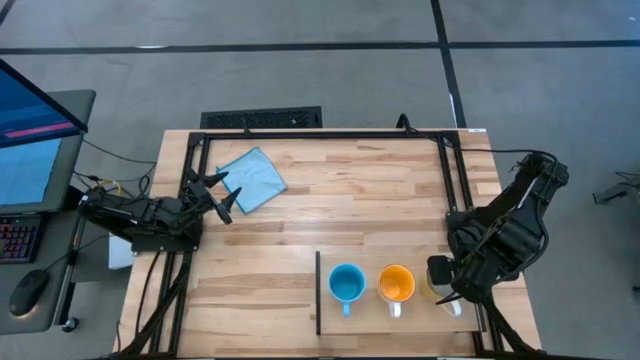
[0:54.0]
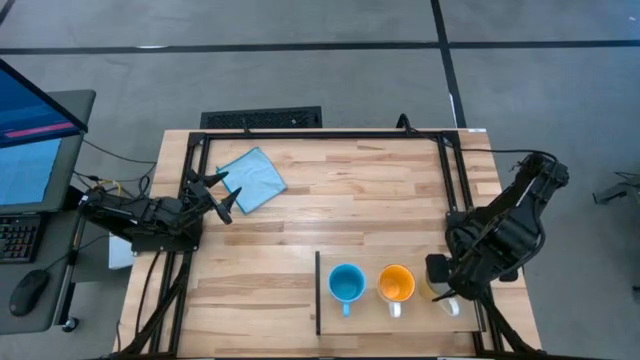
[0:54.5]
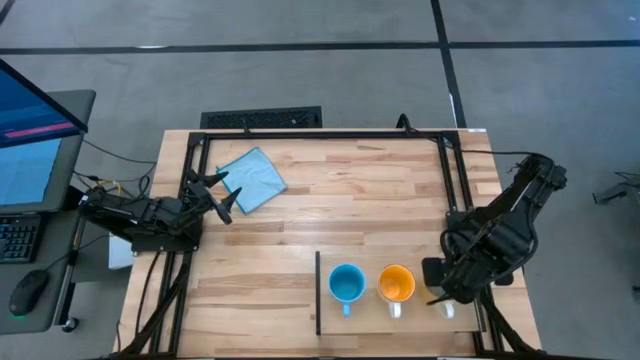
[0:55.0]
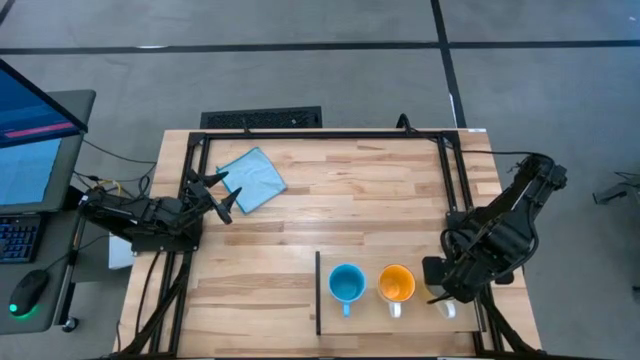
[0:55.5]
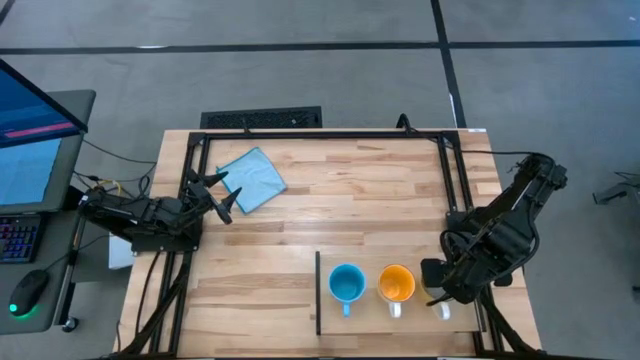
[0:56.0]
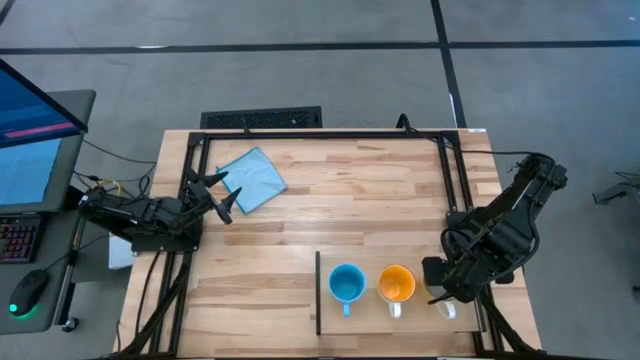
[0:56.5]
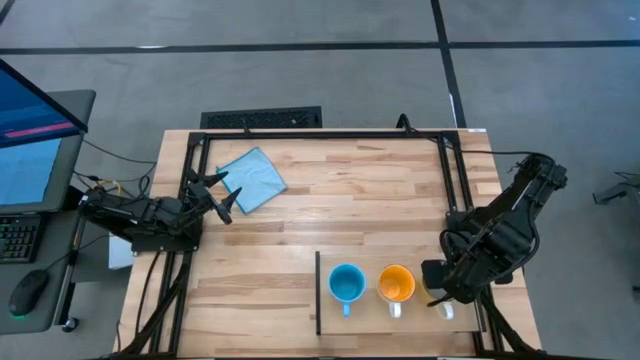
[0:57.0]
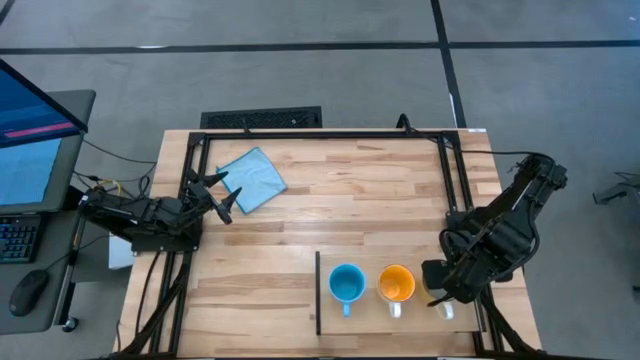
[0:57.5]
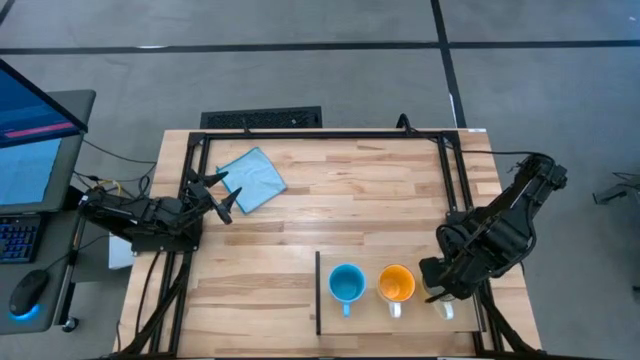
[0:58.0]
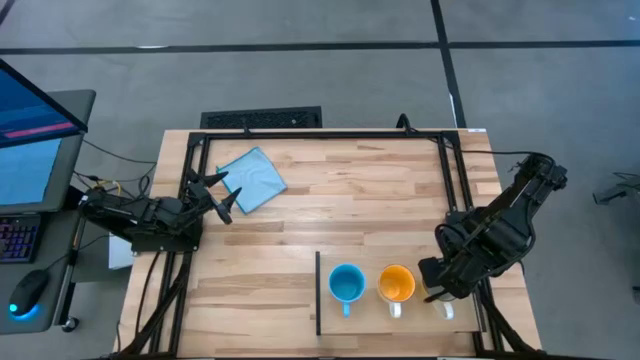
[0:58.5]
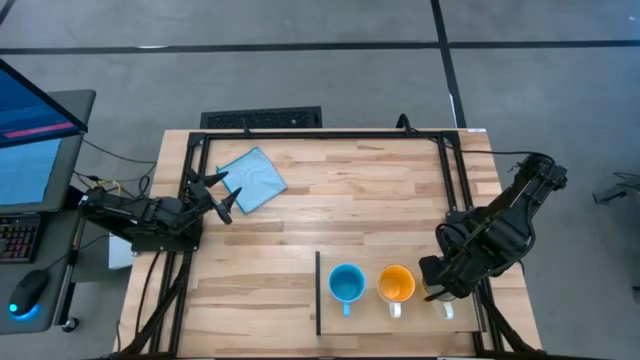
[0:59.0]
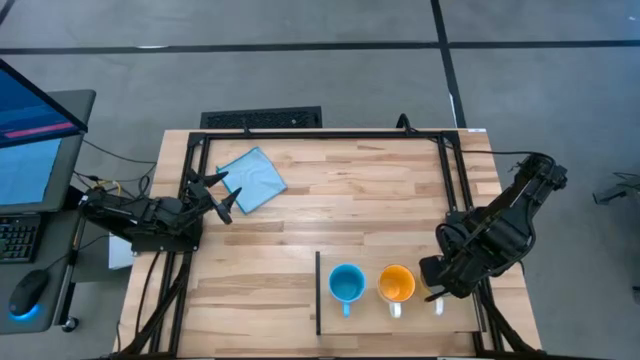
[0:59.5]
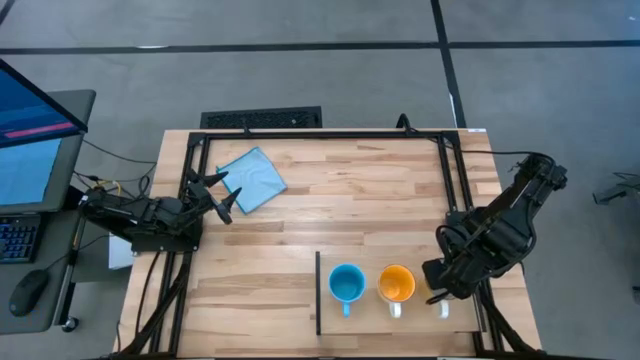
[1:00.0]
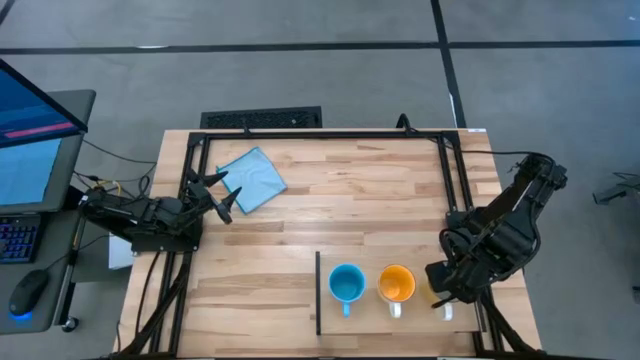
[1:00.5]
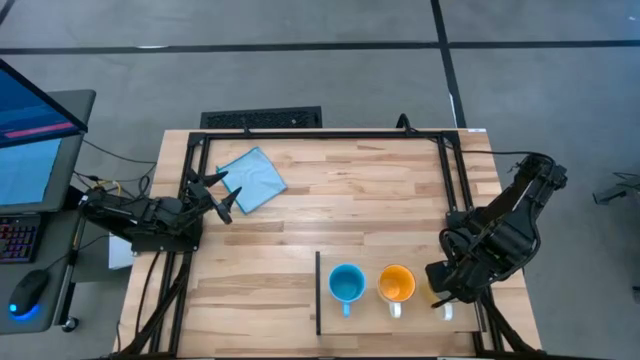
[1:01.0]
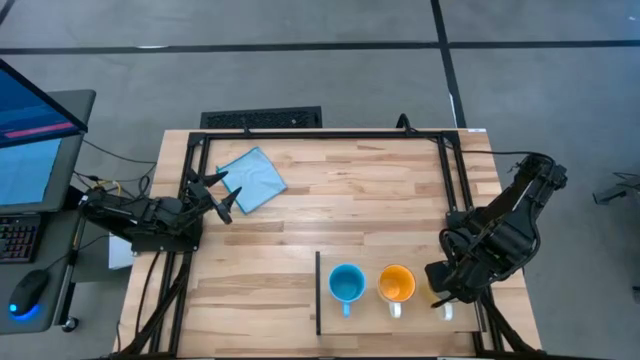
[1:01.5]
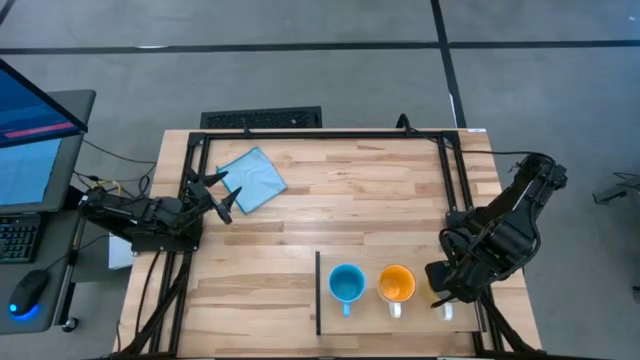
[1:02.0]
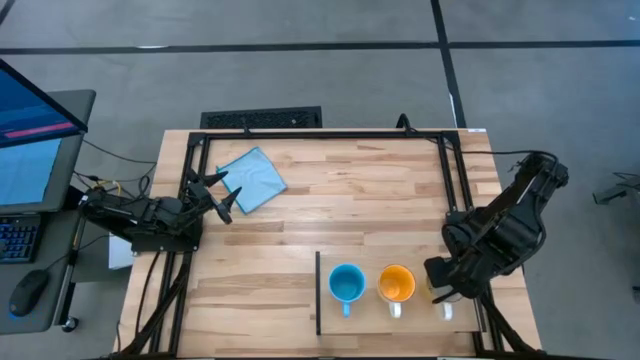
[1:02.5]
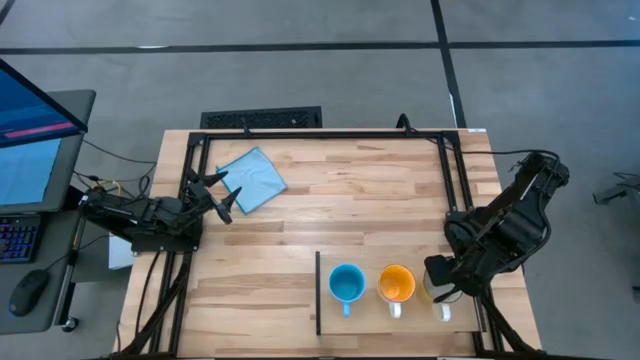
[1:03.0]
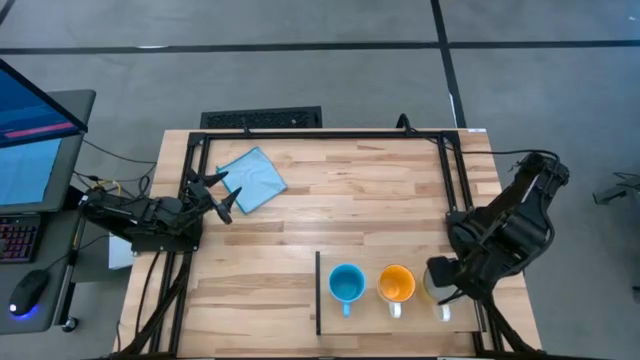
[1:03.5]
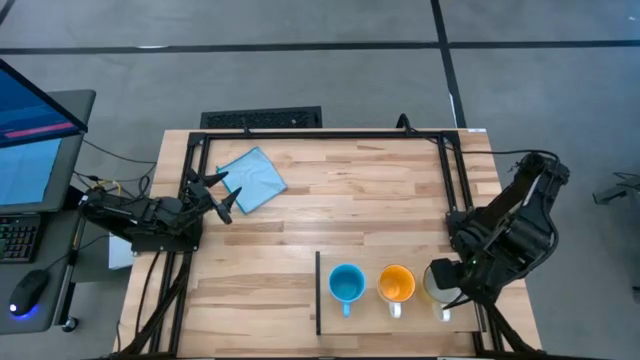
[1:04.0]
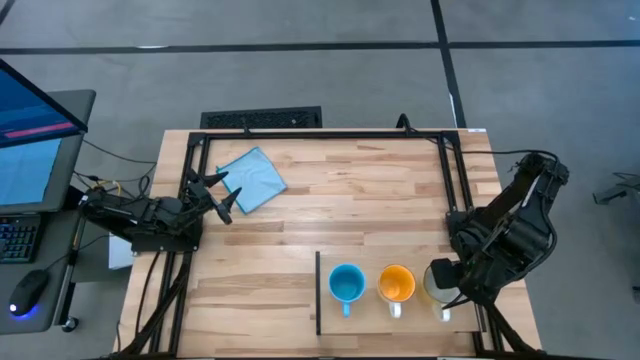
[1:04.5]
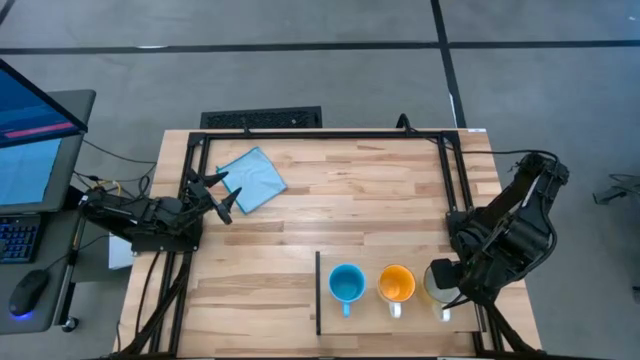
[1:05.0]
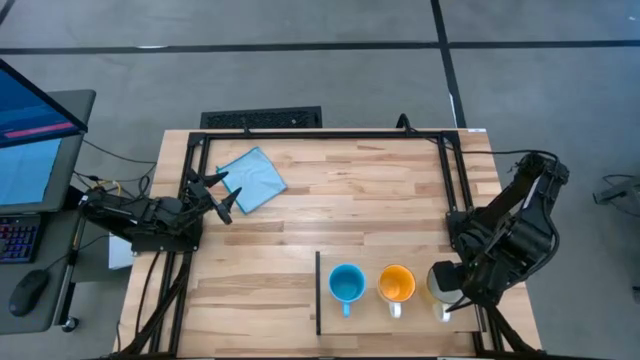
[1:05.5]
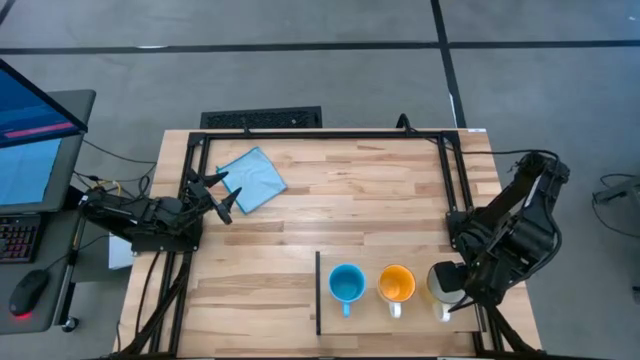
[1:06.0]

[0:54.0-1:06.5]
Task: Stack small to large cups/mugs on shelf
Put the yellow mug on the shelf
